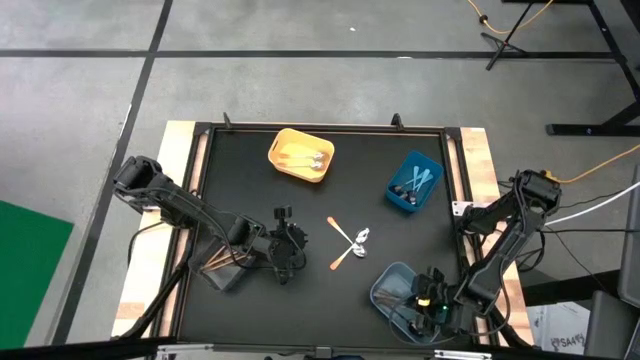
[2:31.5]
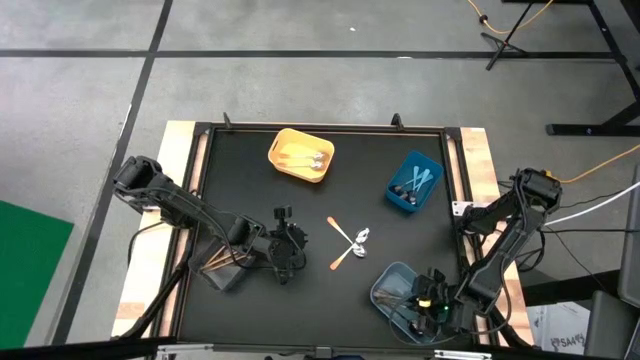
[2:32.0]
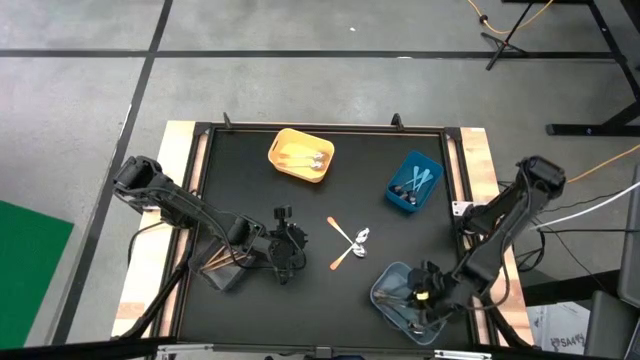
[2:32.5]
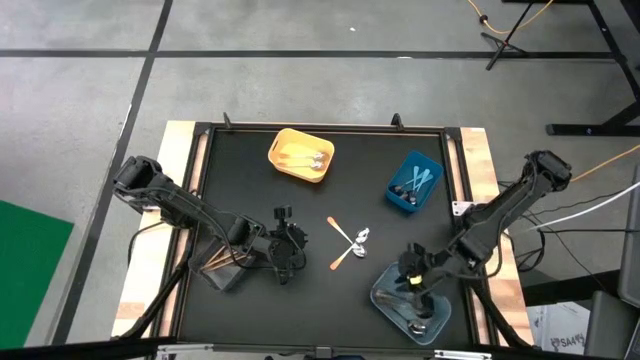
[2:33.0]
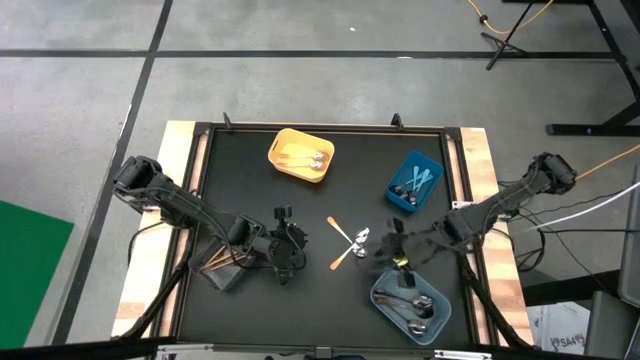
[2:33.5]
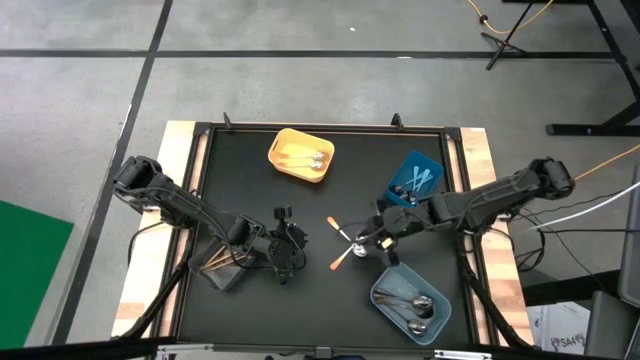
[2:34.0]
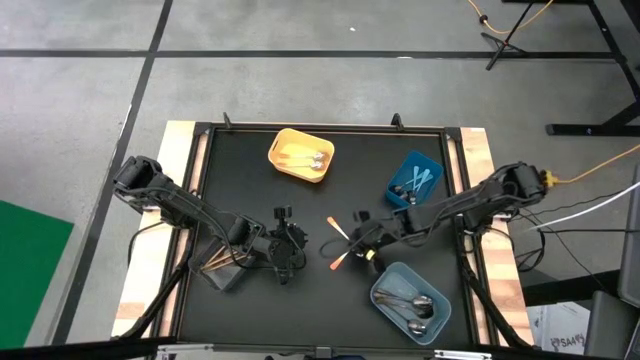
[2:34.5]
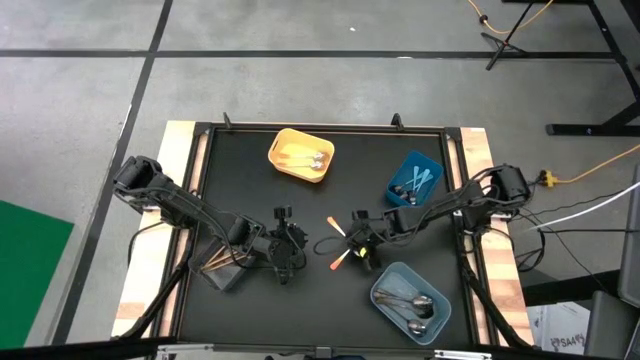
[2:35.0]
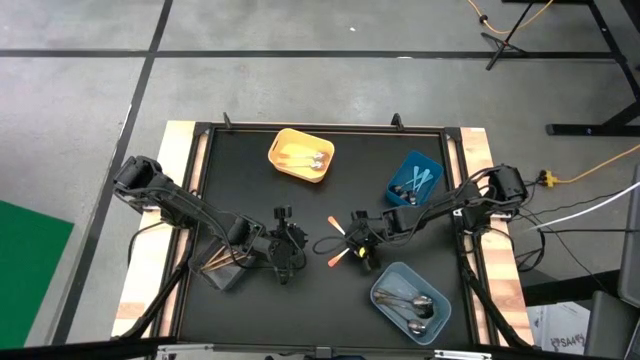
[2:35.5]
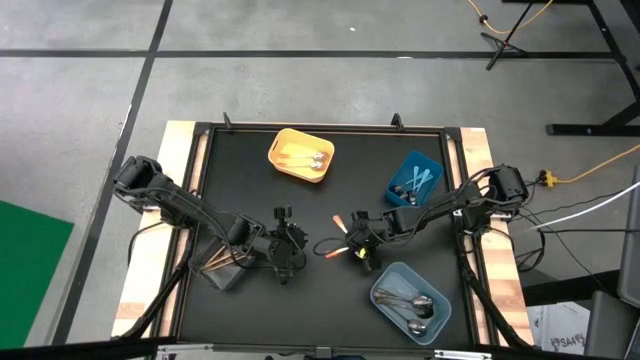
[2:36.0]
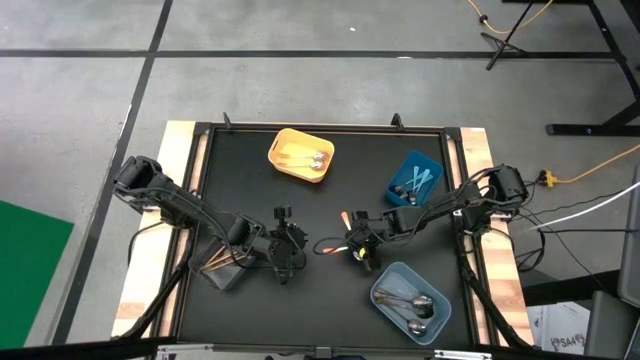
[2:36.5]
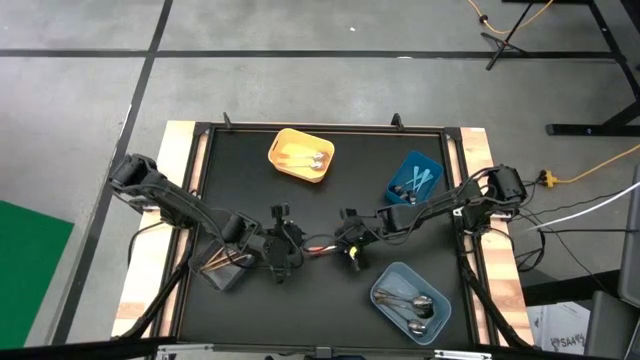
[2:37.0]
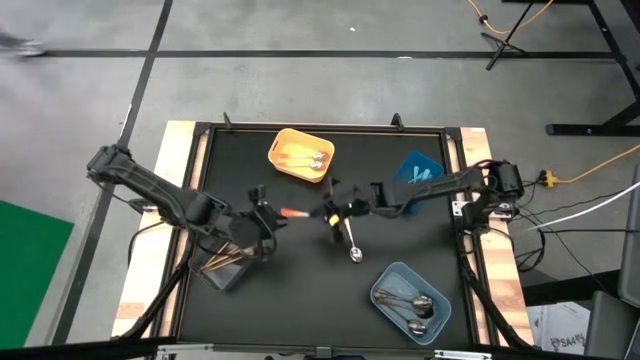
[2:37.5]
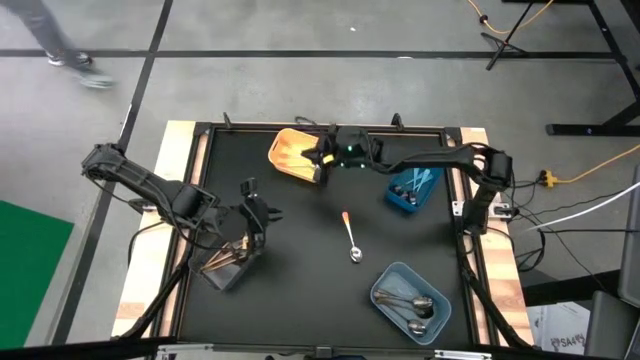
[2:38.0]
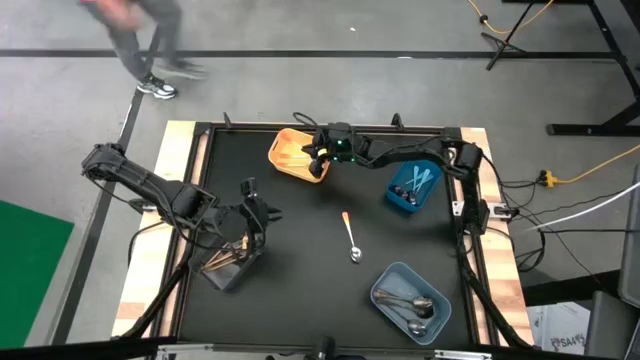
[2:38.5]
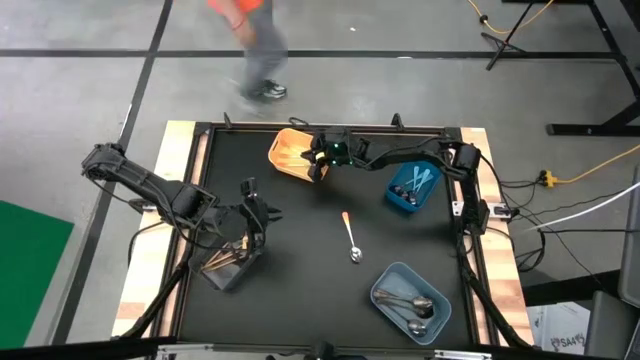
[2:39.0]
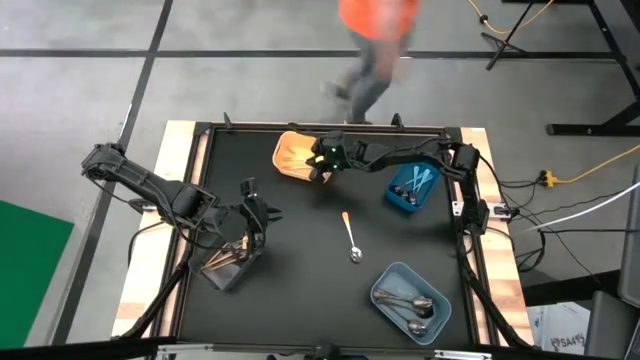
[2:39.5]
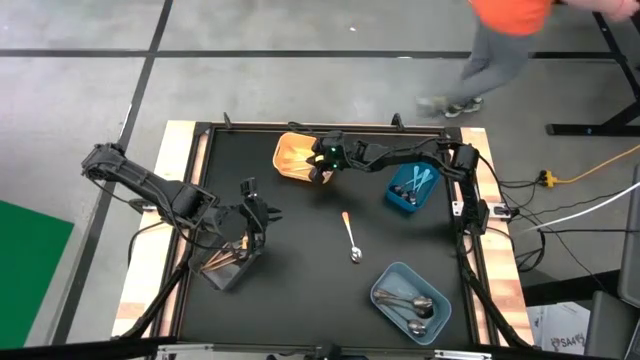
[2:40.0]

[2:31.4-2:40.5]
Task: Sort silverware by color (type)
Put the orange spoon into the yellow bin

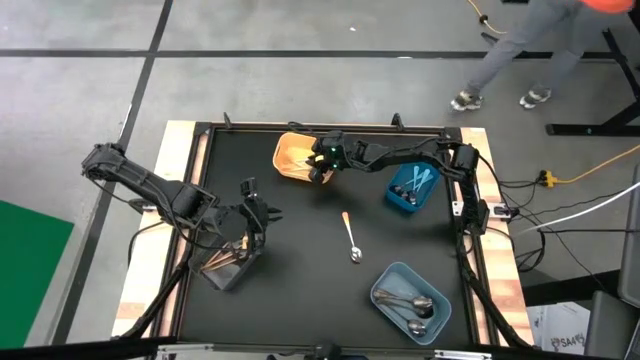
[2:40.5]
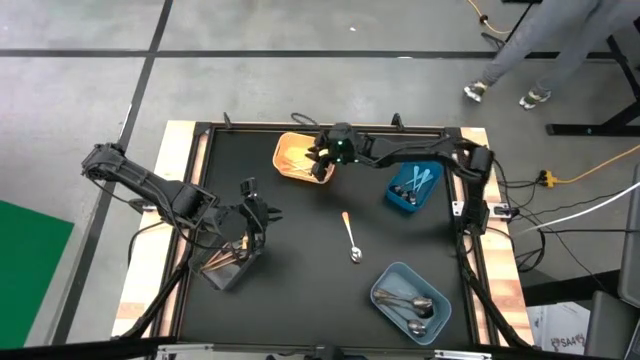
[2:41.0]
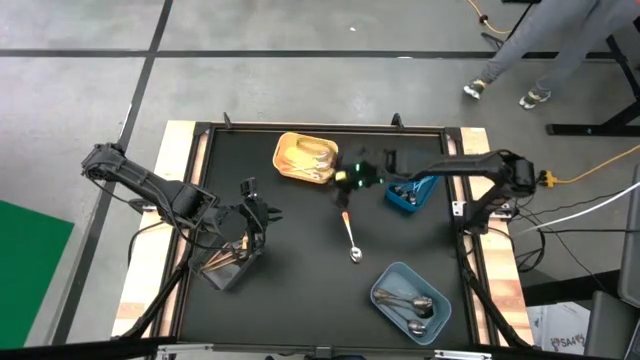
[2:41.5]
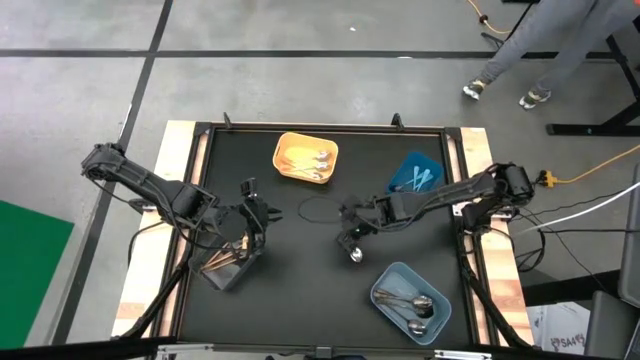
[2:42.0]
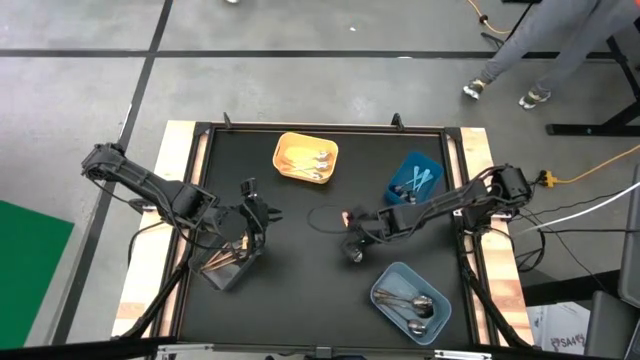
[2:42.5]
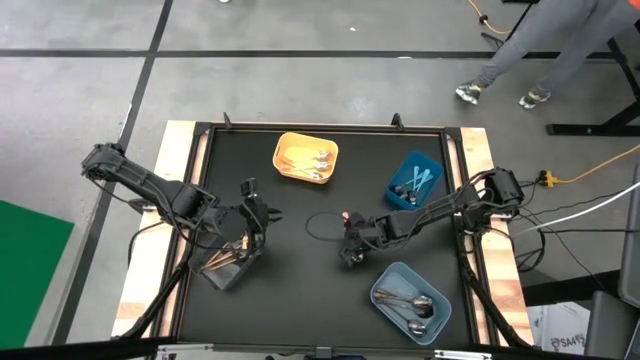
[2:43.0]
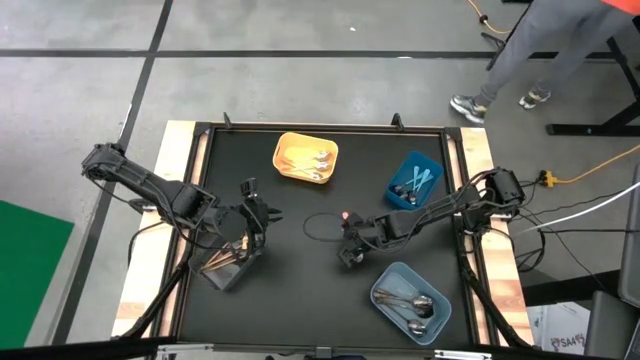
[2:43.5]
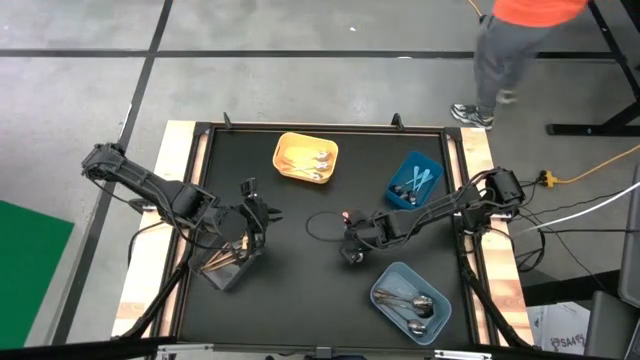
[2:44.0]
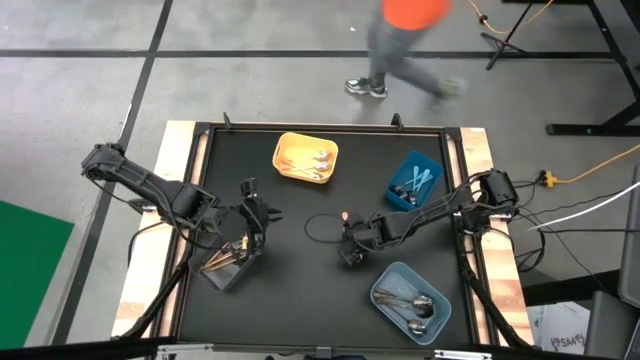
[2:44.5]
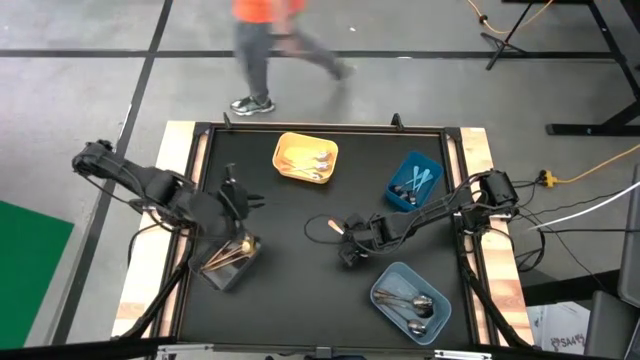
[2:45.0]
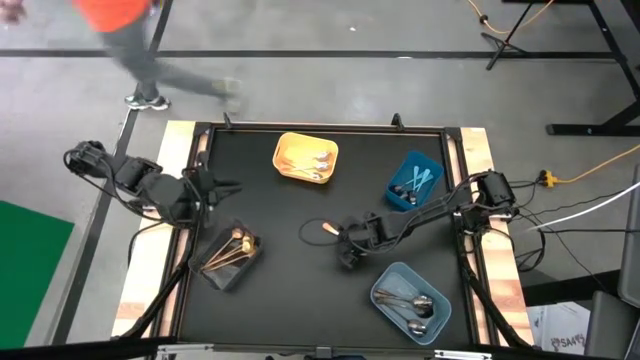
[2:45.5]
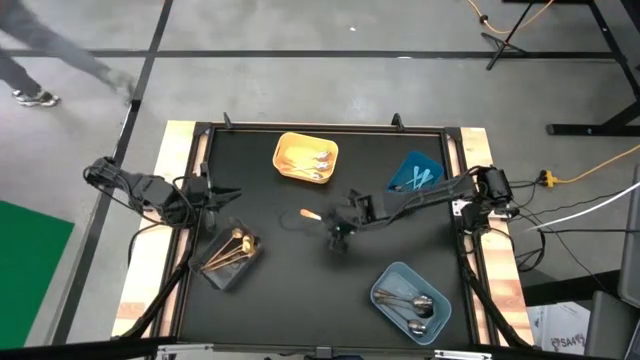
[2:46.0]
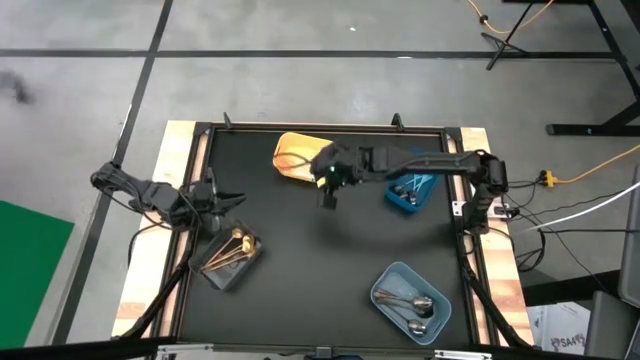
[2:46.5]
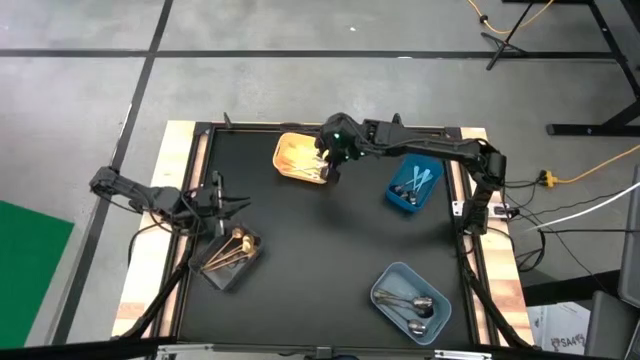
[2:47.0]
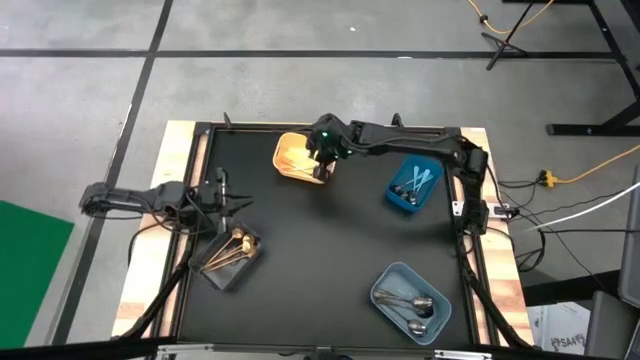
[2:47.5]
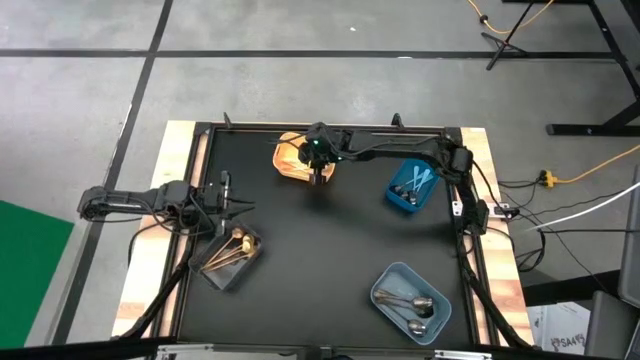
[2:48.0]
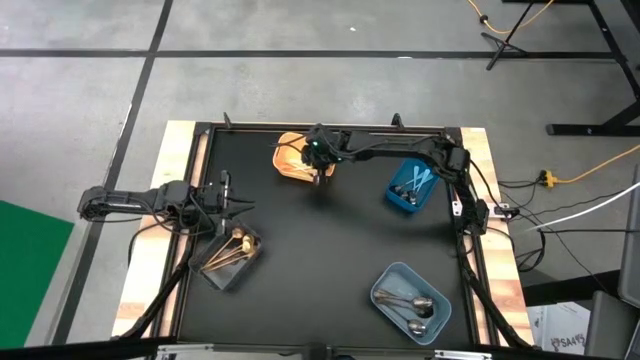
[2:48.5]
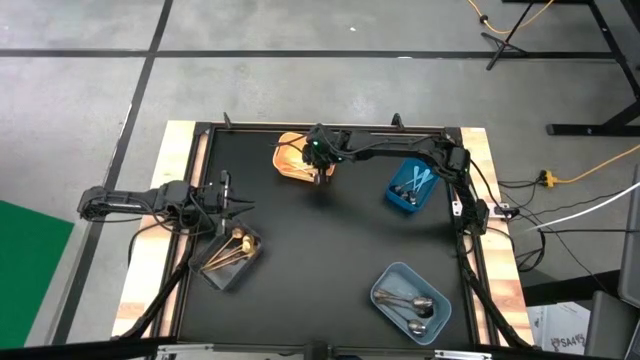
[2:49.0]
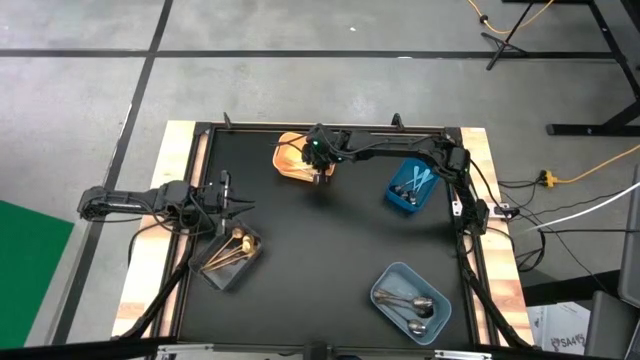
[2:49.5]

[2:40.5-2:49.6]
Put the orange spoon into the yellow bin
